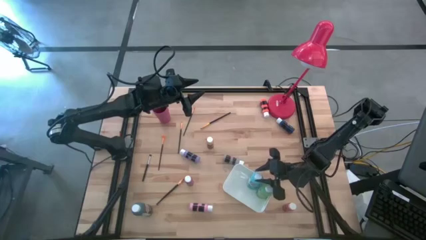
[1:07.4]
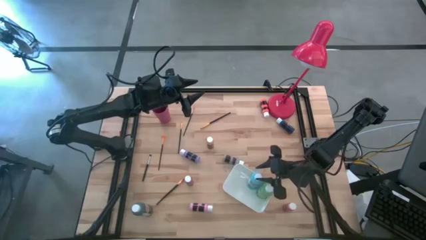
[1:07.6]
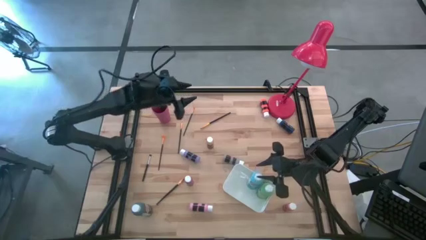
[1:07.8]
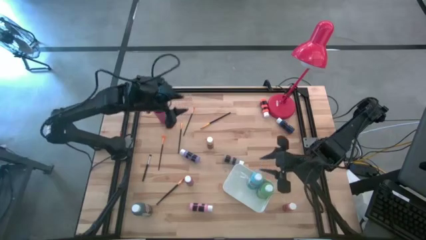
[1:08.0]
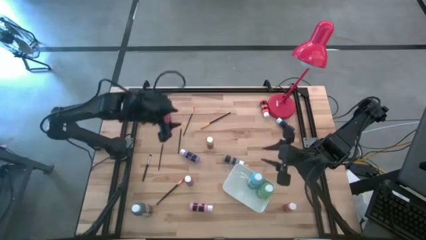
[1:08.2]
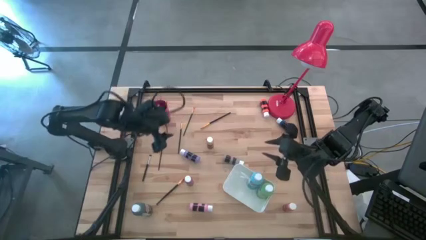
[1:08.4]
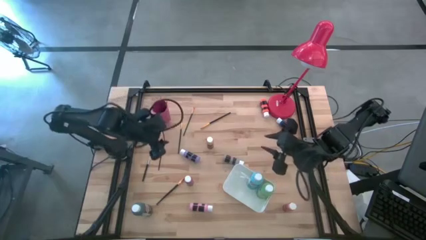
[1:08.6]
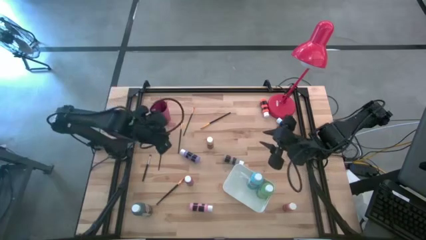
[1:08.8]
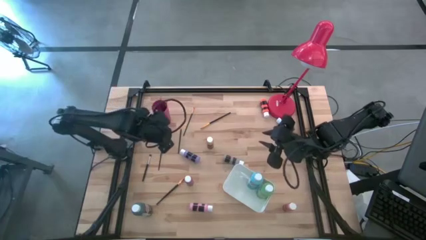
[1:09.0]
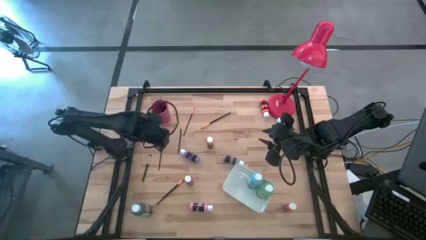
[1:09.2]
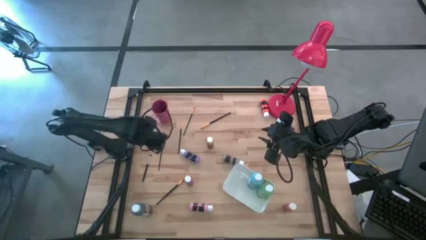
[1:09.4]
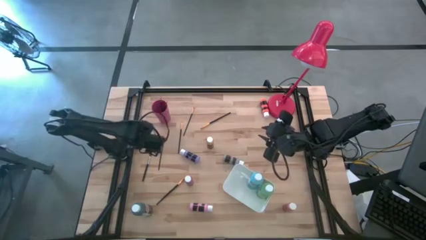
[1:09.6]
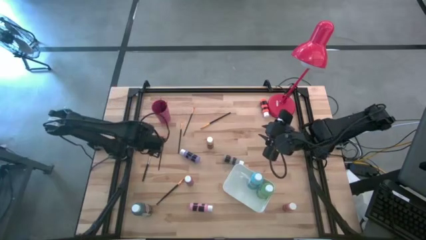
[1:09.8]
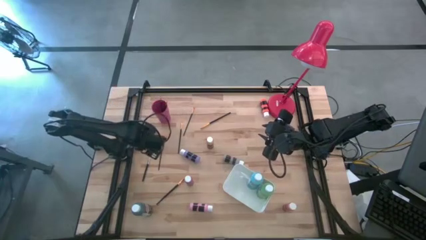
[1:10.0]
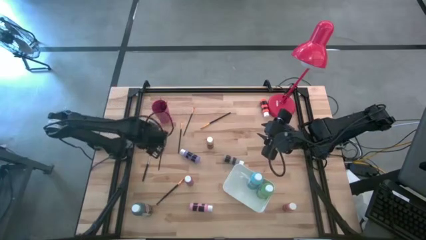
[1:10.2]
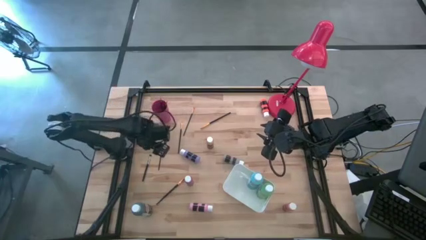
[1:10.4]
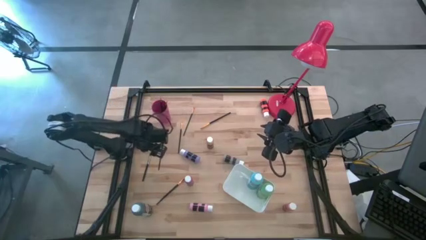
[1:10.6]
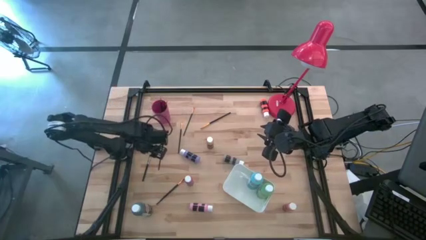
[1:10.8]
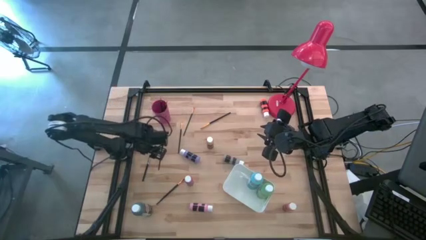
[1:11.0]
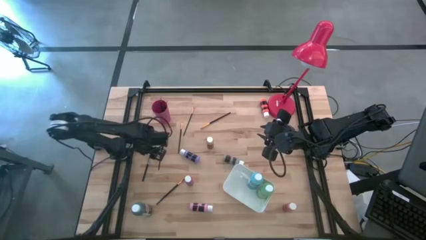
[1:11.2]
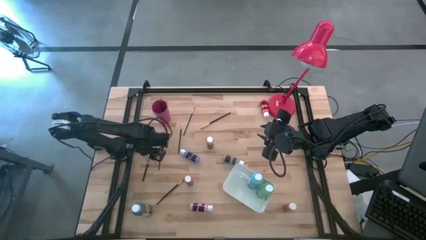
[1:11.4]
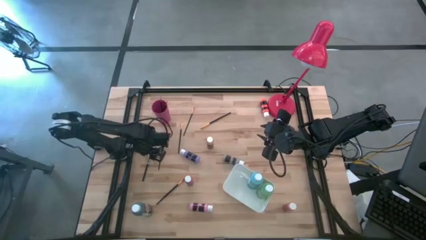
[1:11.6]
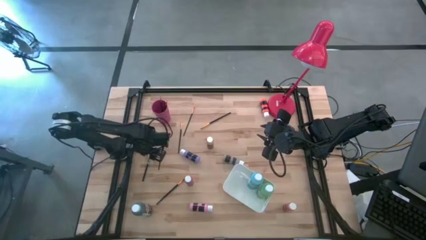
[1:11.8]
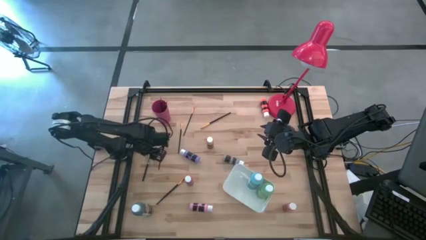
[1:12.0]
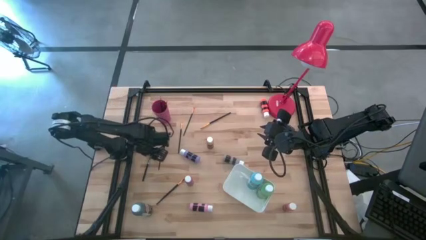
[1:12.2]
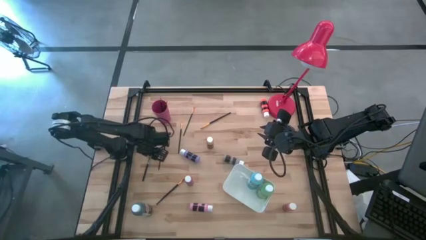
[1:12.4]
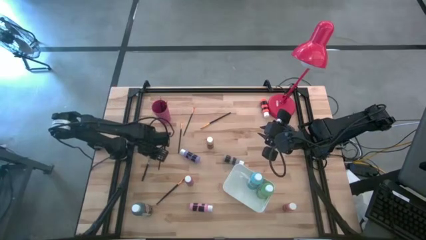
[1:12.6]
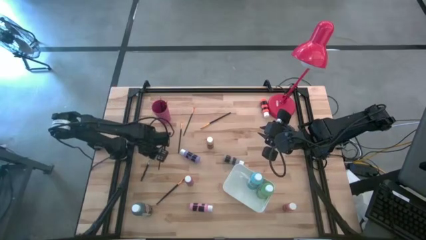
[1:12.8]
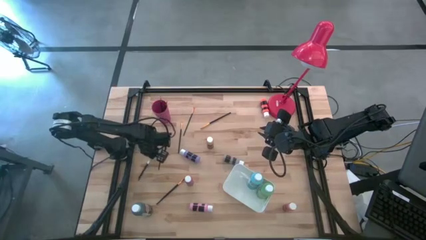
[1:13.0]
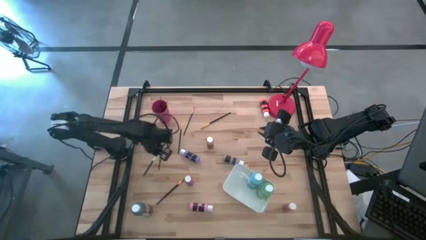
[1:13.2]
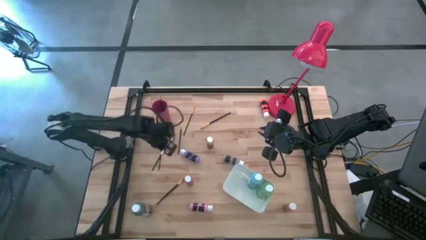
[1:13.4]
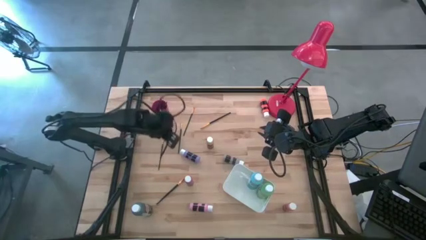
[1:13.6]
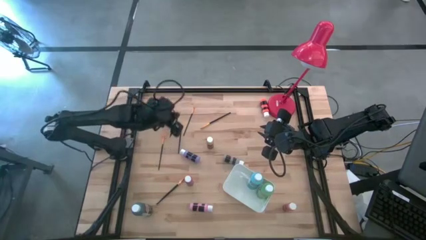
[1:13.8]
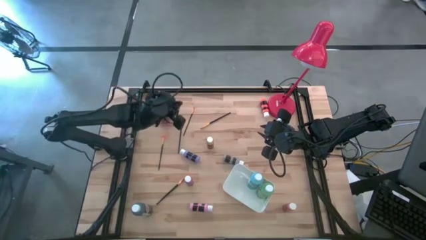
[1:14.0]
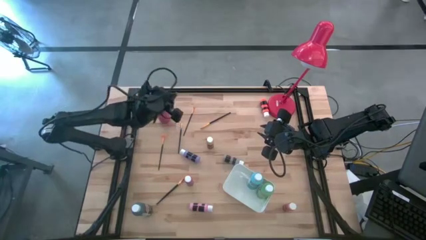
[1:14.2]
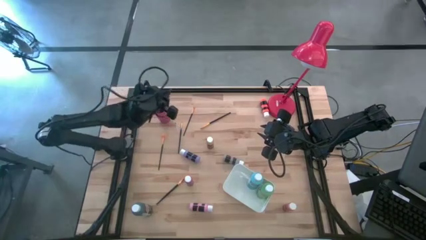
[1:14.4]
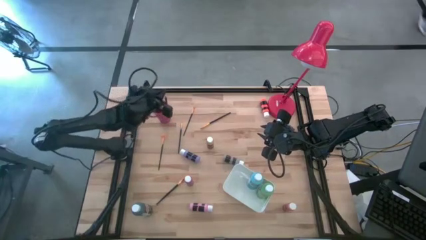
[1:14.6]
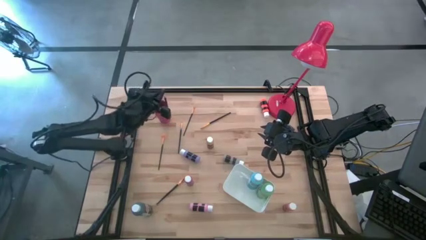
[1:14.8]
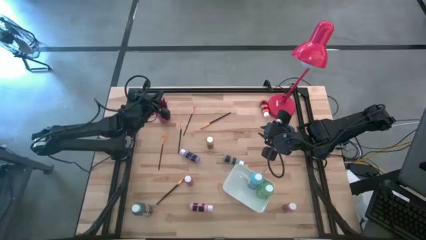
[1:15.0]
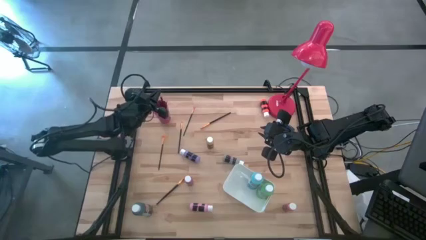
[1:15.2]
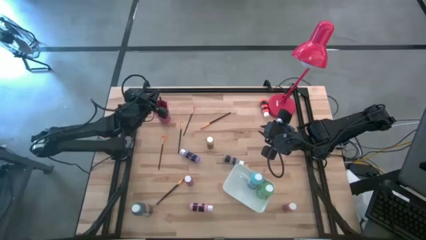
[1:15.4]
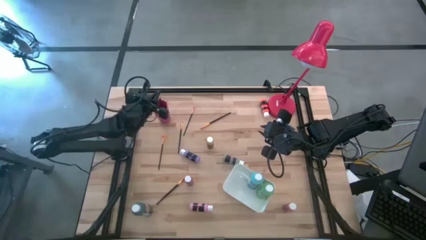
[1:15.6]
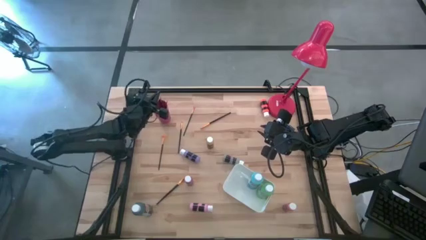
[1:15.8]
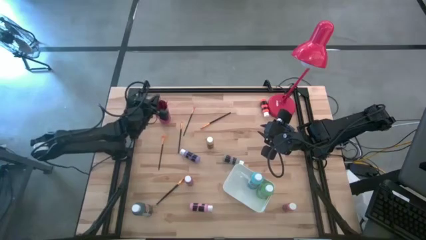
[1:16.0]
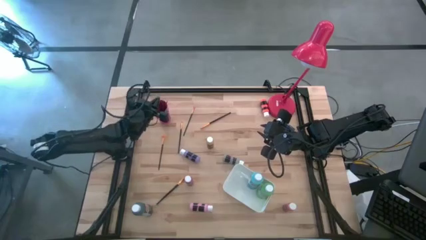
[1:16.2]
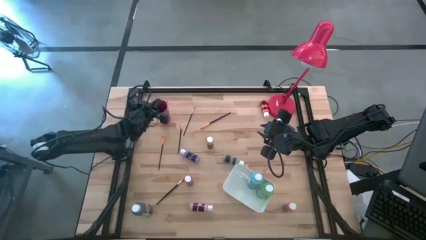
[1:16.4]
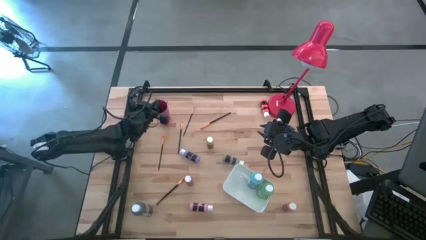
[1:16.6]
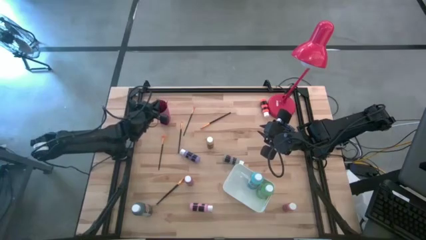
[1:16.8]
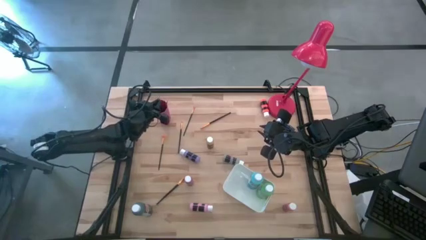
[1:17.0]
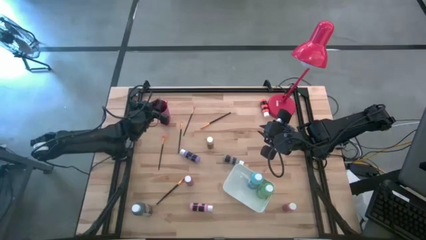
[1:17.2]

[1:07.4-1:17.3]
Task: Pick & Place Paint Supplies
Put the silver paintbrush into the pink cup

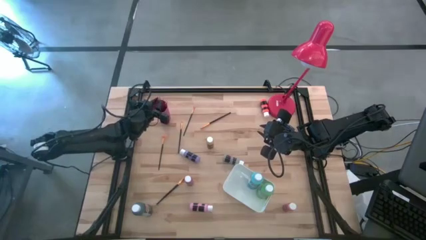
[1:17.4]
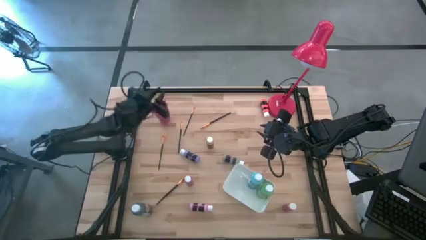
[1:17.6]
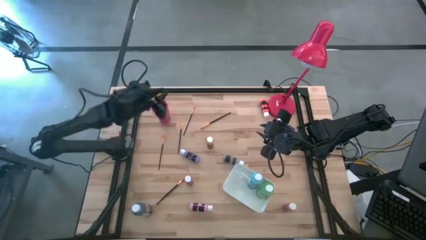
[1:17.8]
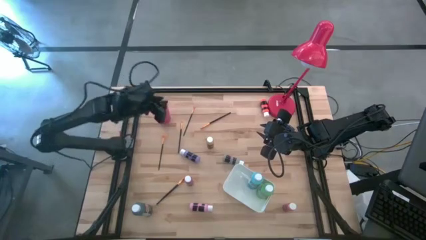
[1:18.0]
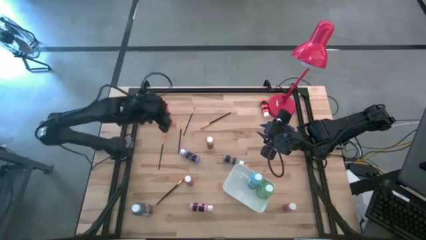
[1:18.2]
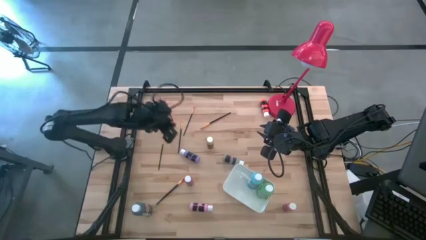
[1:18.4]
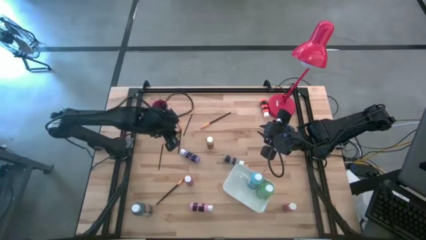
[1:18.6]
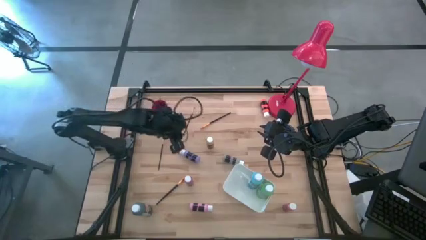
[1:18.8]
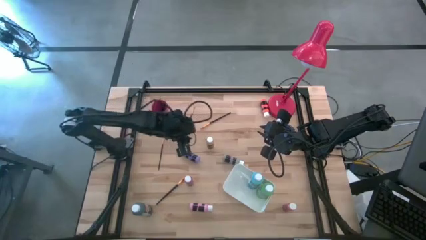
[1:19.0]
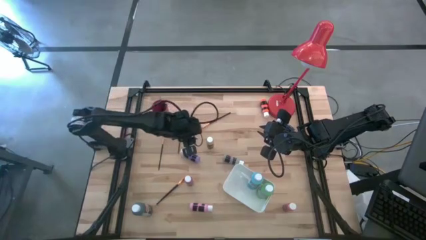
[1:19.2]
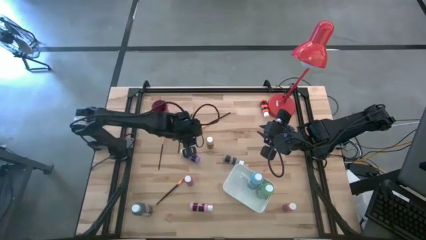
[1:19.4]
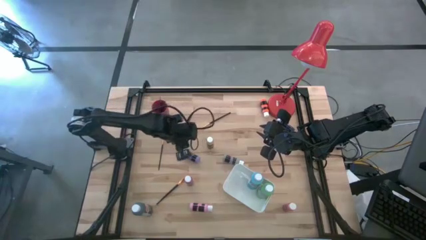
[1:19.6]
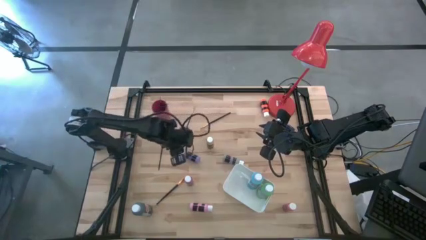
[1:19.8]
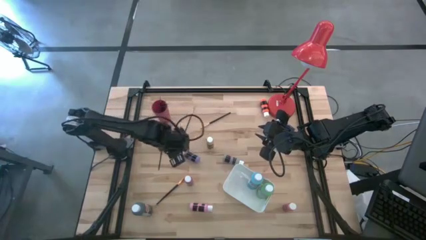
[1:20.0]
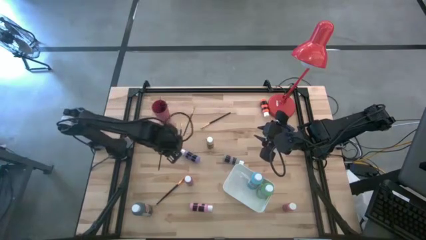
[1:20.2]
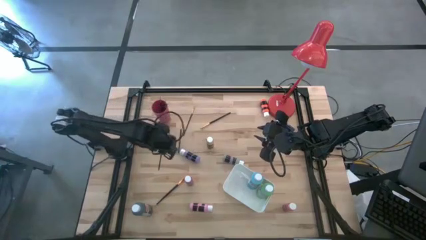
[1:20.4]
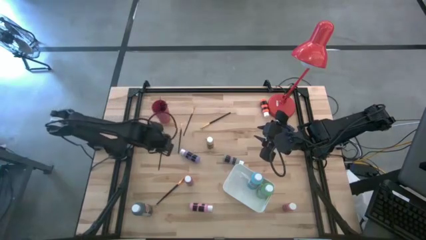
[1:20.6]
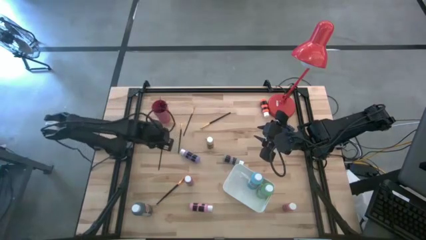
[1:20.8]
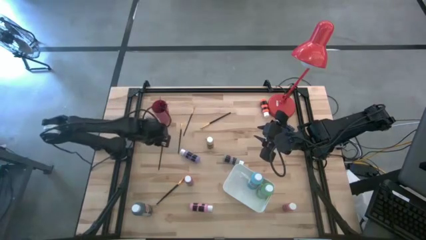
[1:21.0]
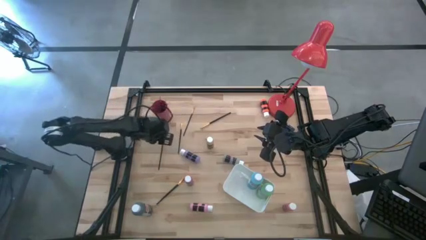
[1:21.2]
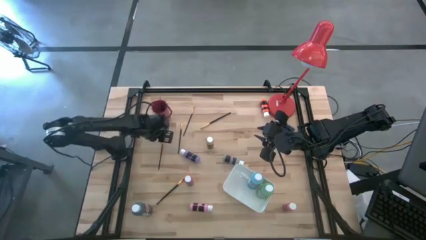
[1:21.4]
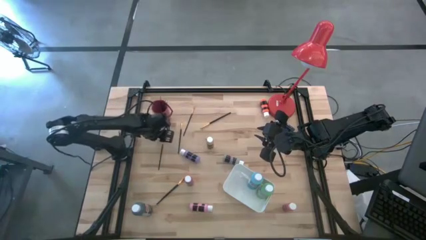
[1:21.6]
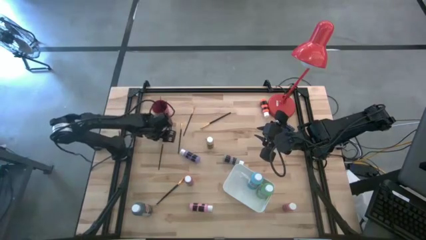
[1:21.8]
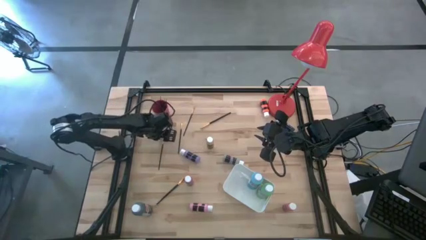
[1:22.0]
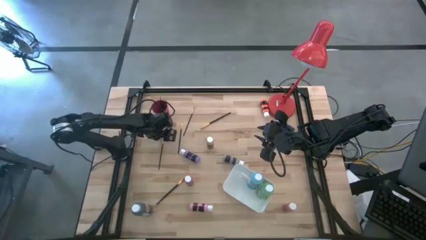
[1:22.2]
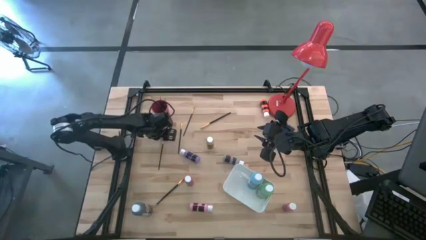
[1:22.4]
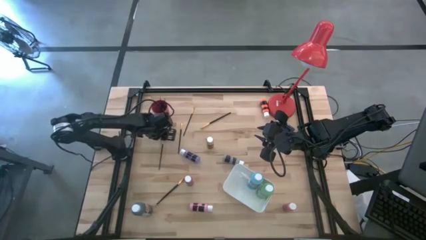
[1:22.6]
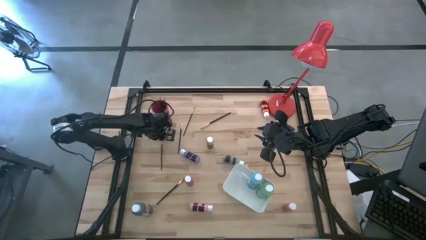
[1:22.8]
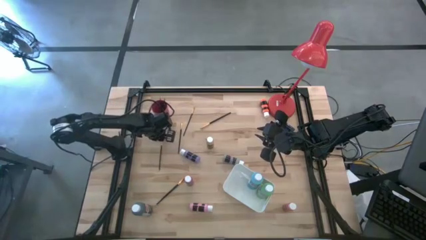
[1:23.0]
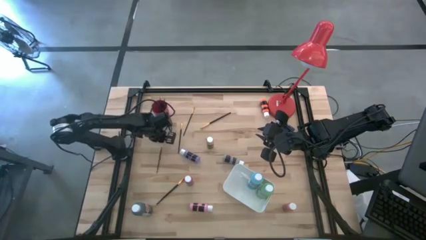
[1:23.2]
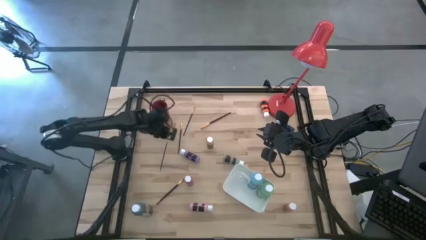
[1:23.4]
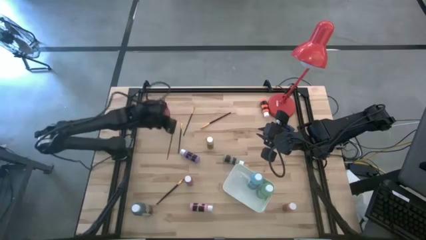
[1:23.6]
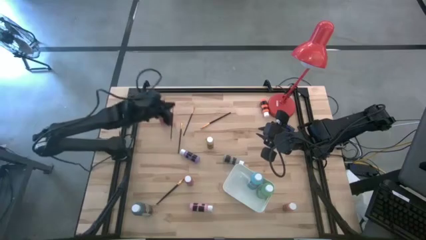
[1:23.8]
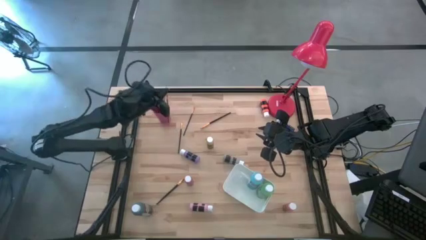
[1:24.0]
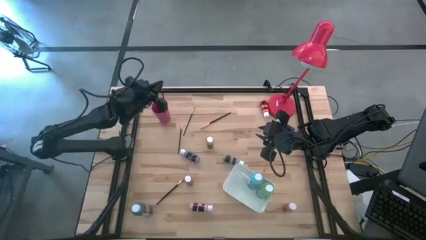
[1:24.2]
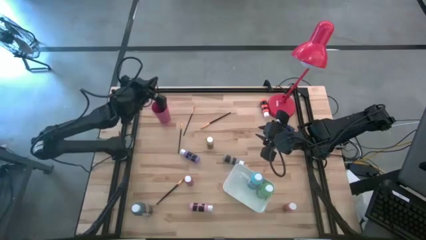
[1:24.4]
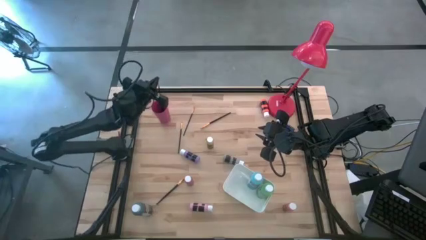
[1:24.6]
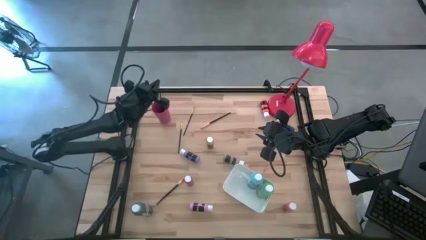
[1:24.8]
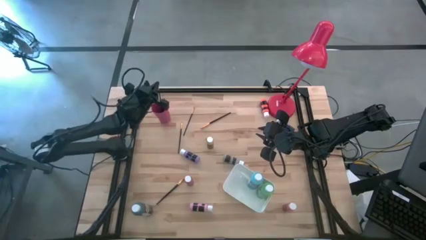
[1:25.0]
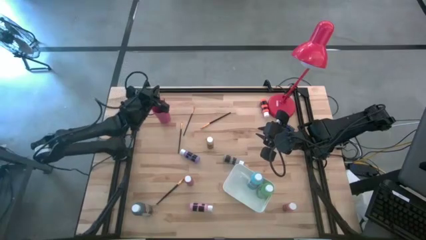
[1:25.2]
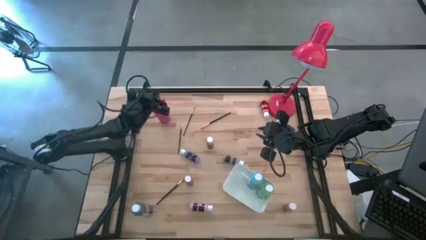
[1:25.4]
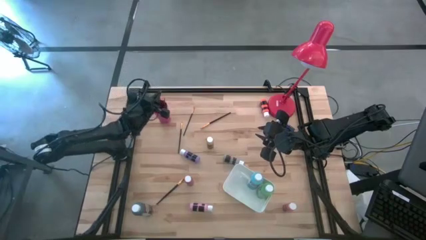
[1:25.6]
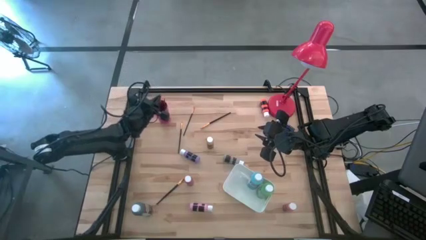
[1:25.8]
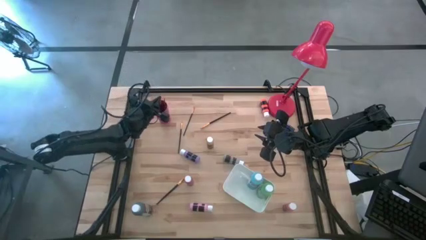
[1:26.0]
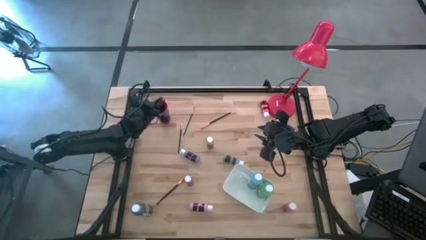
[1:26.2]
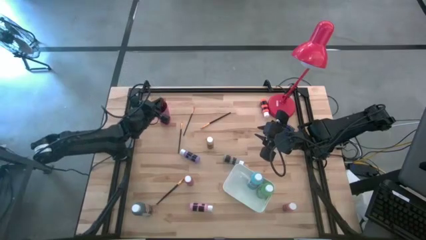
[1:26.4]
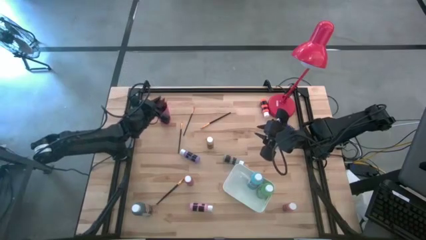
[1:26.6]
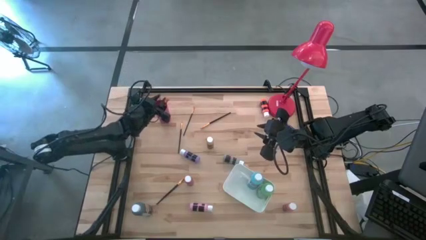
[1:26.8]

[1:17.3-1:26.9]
Put the orange paintbrush into the pink cup
